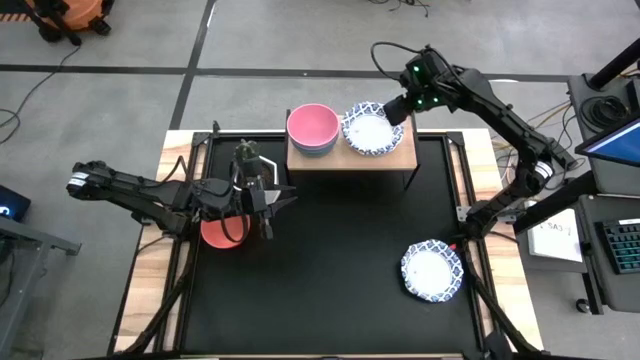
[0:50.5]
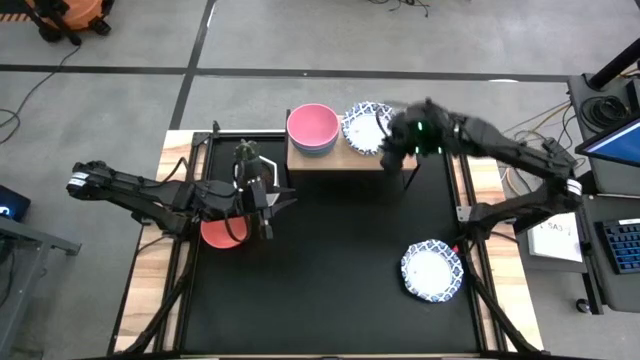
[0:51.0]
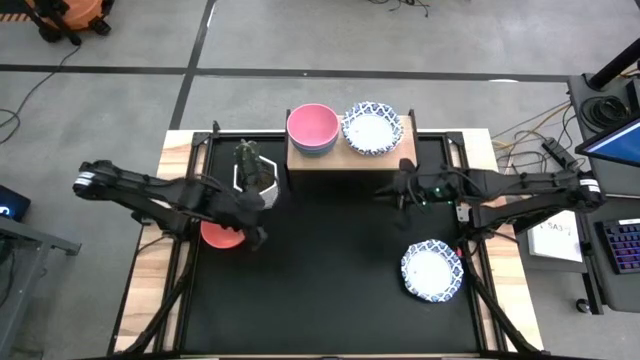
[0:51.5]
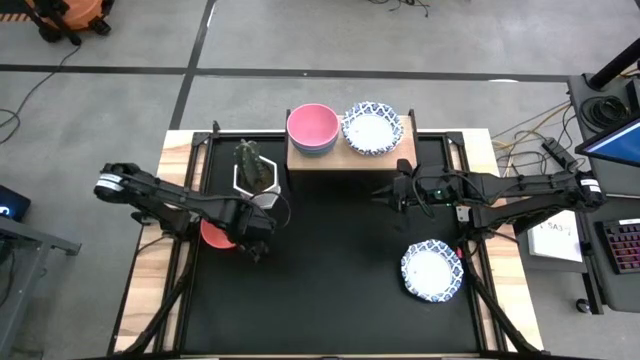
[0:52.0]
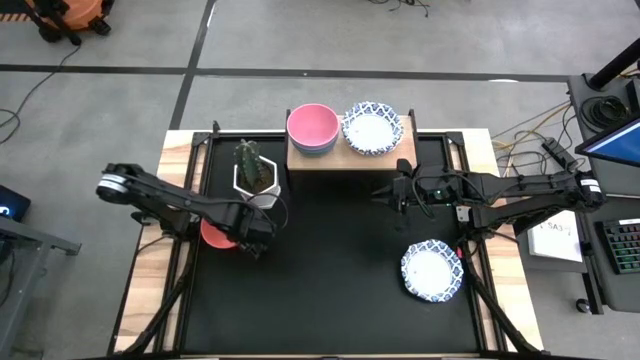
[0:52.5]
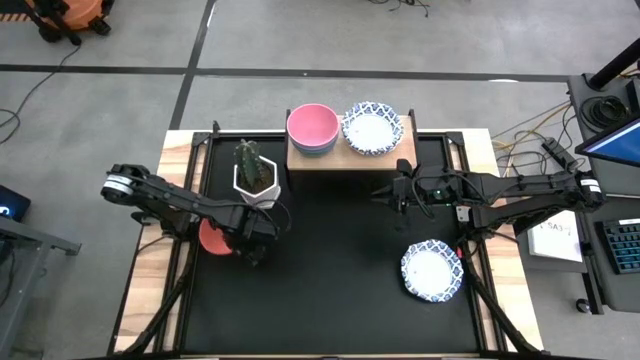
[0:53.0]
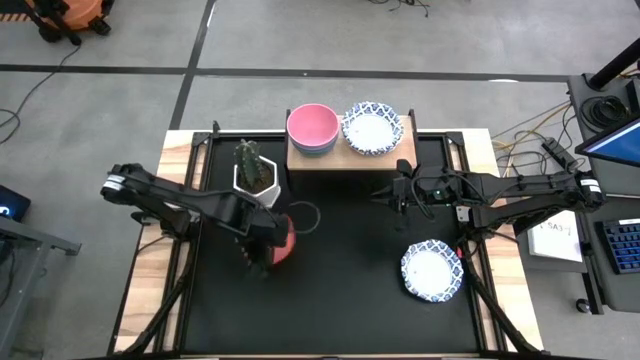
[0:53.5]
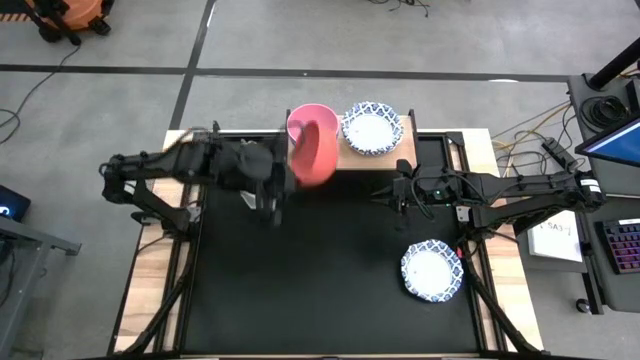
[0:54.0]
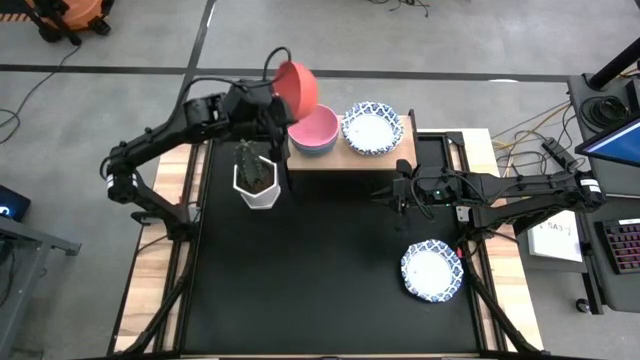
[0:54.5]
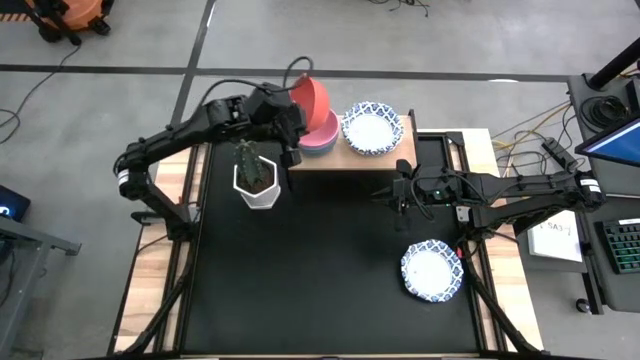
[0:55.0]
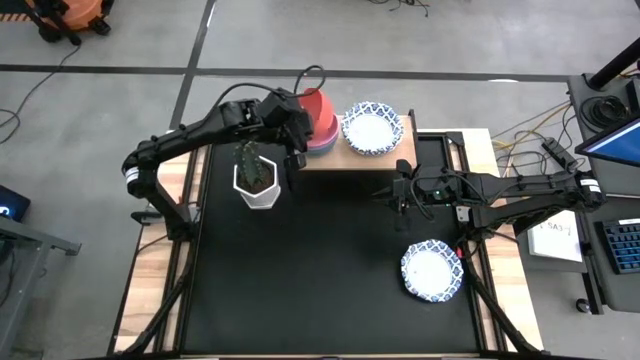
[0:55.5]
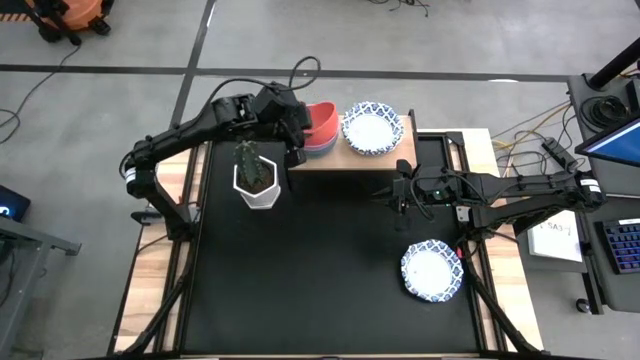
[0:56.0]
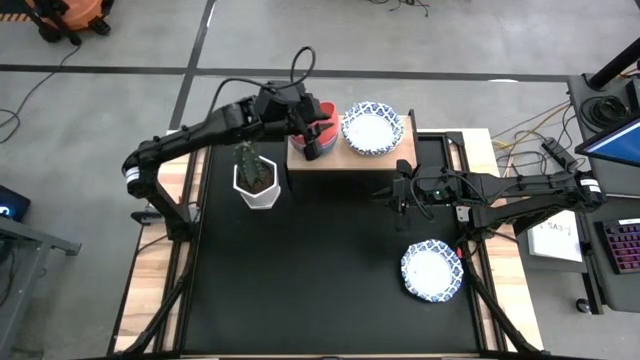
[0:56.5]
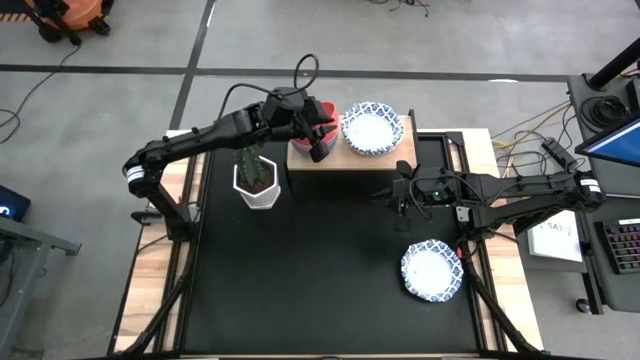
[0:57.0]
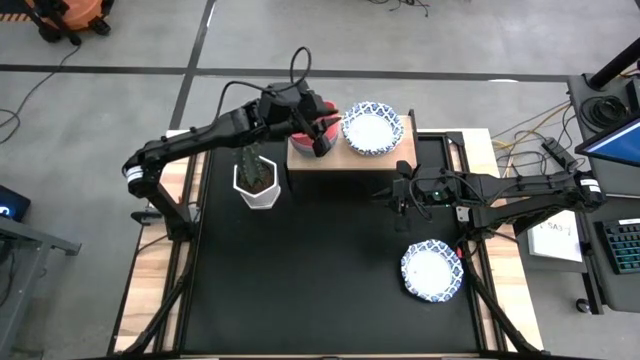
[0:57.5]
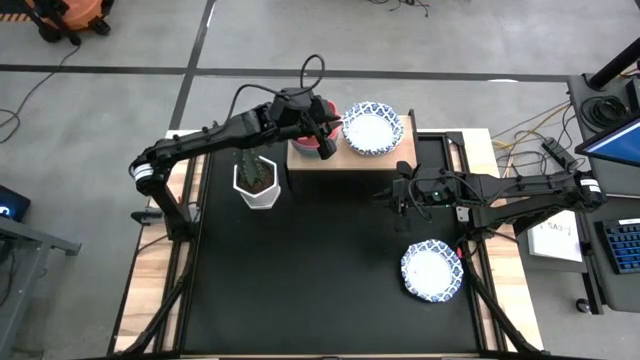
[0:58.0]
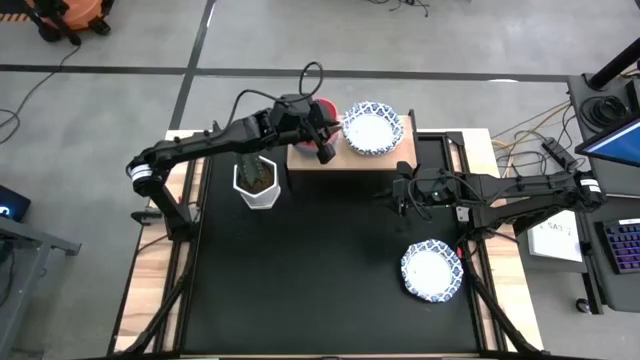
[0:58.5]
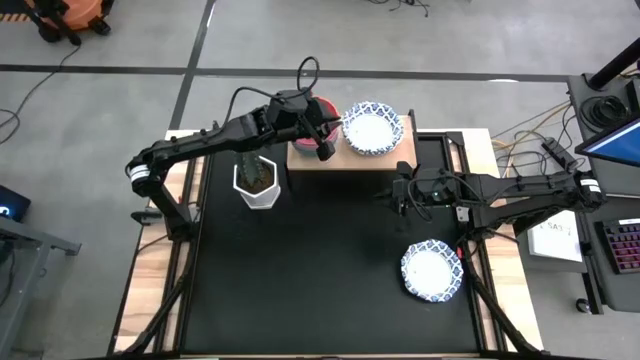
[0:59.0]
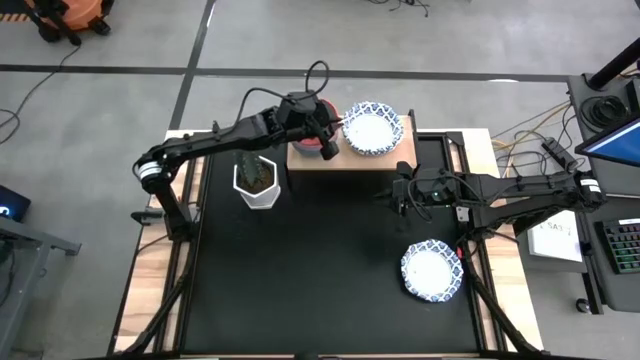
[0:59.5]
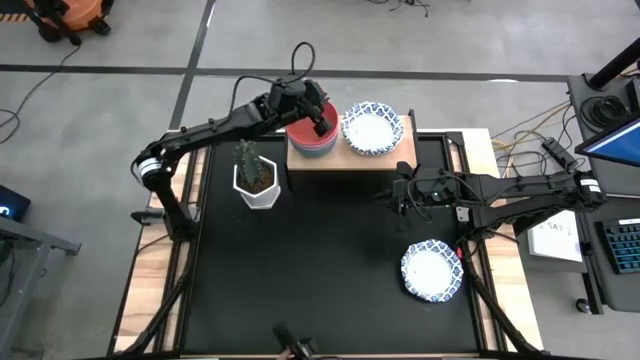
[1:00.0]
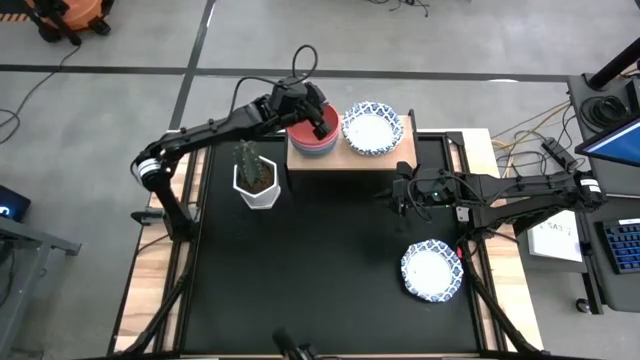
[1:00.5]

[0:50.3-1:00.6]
Task: Place and stack bowls onto a shelf
Stack the orange bowl on top of the pink bowls on the shelf

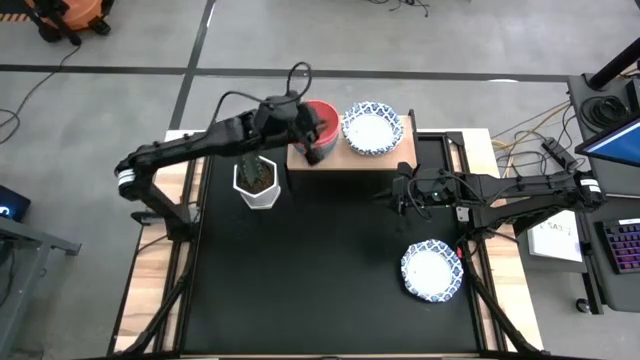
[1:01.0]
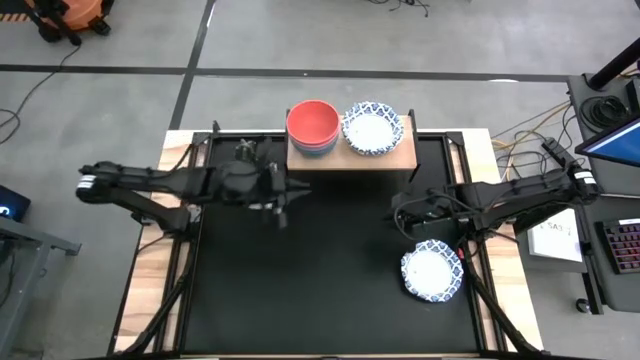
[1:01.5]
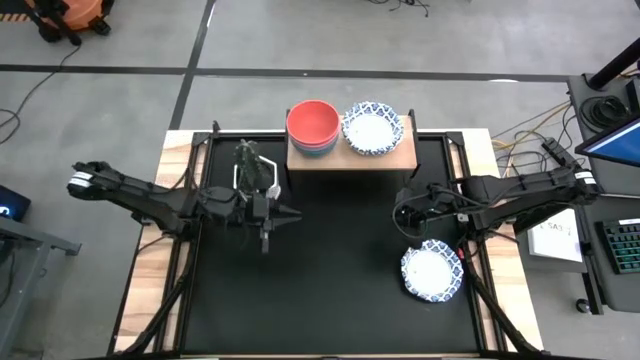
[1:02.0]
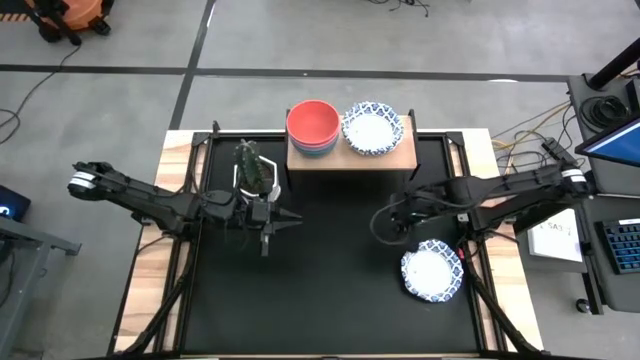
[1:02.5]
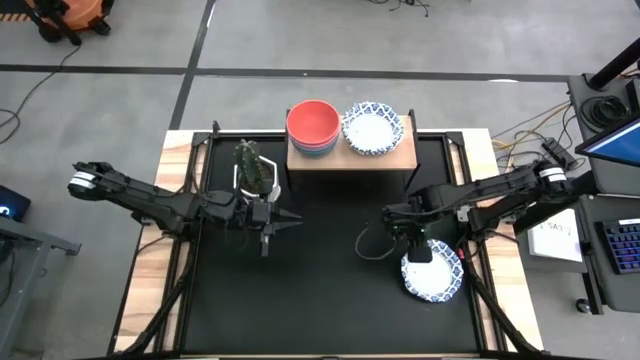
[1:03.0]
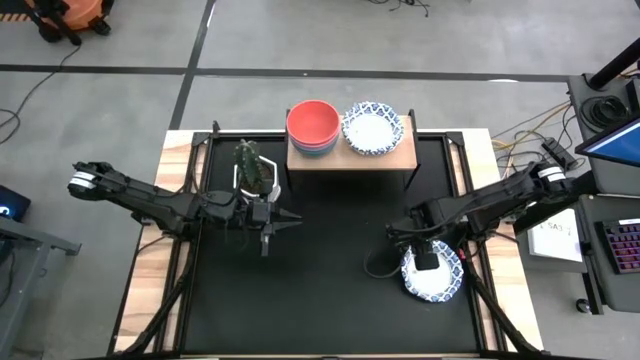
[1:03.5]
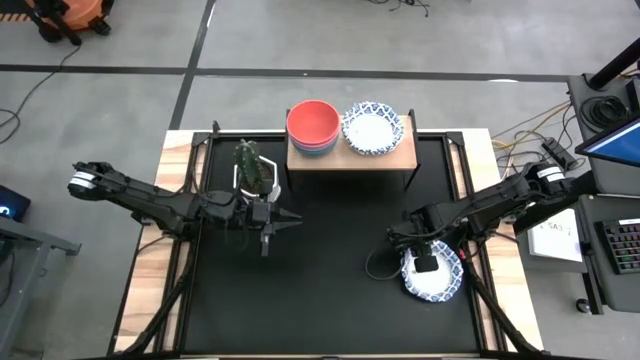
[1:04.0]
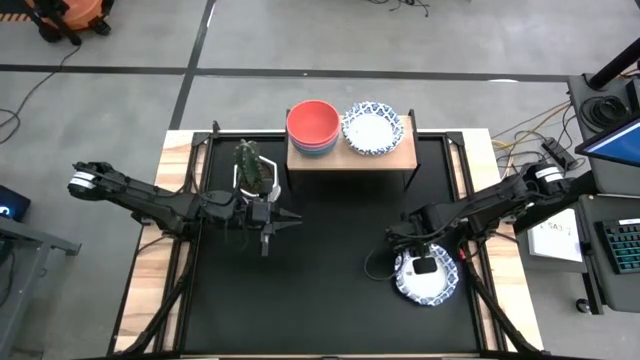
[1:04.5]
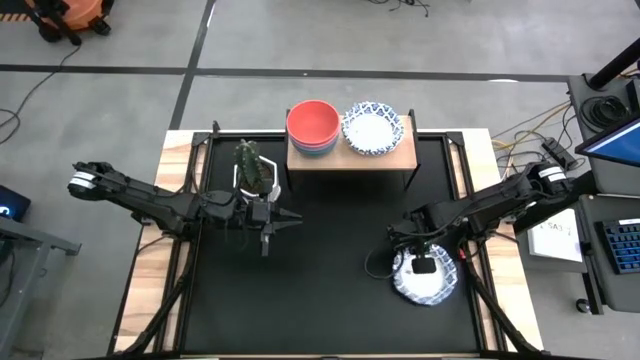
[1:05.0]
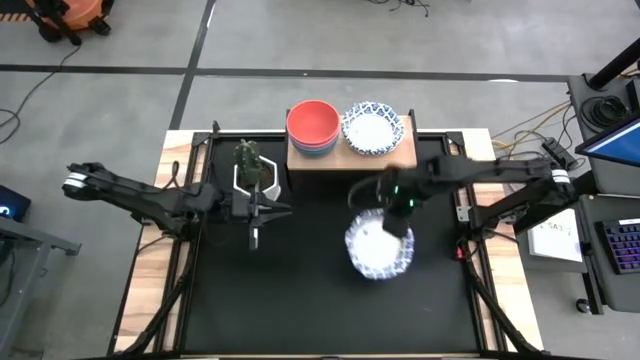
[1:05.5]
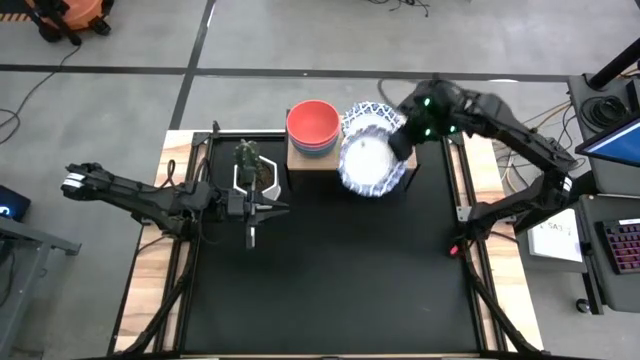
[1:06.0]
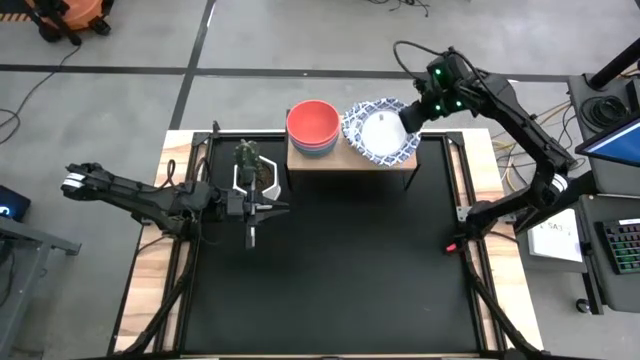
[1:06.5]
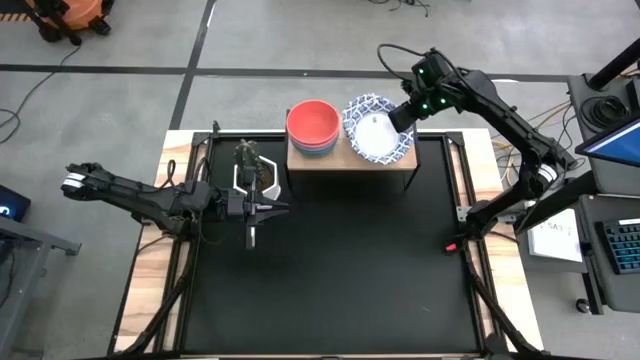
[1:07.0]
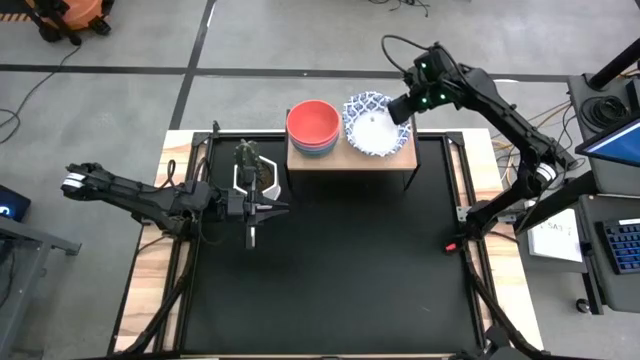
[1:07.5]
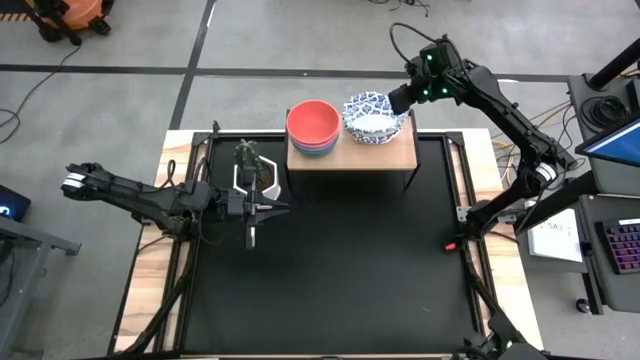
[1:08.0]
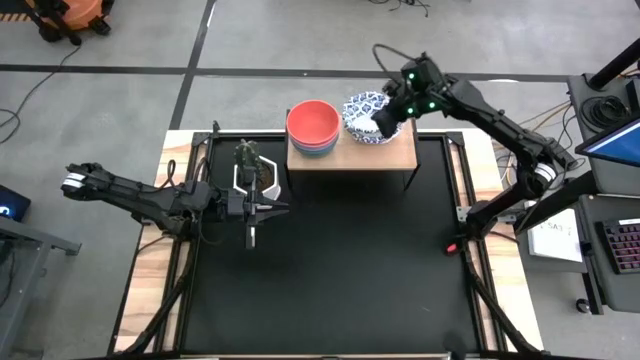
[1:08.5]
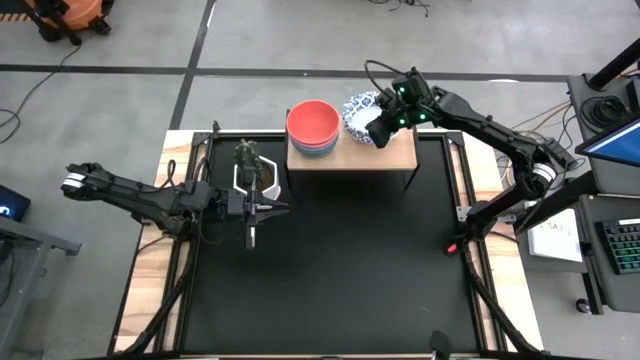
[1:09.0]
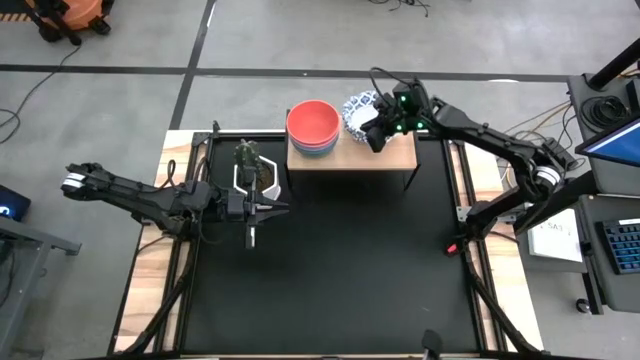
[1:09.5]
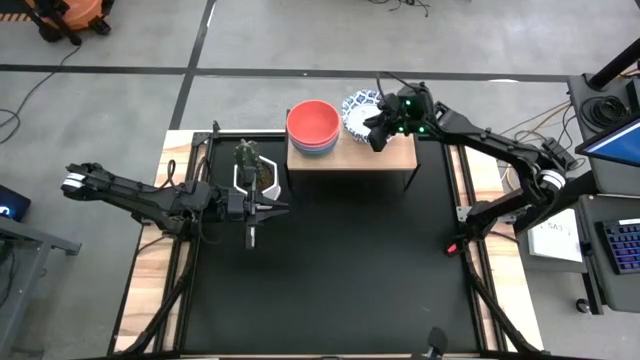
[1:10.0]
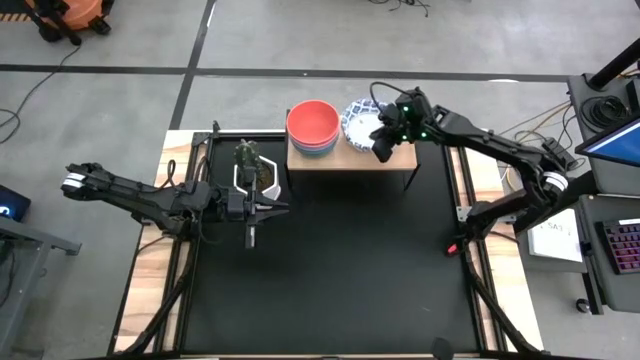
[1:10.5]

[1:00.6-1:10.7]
Stack the blue patterned bowl on top of the blue patterned bowls on the shelf

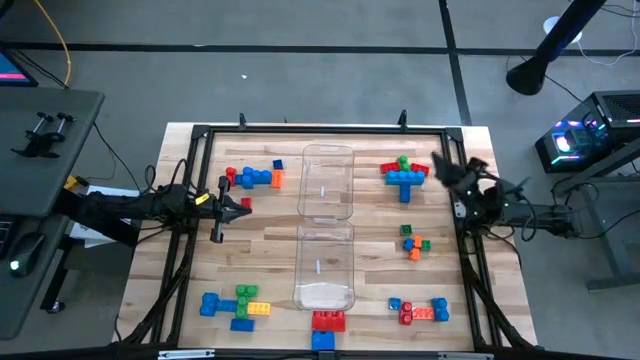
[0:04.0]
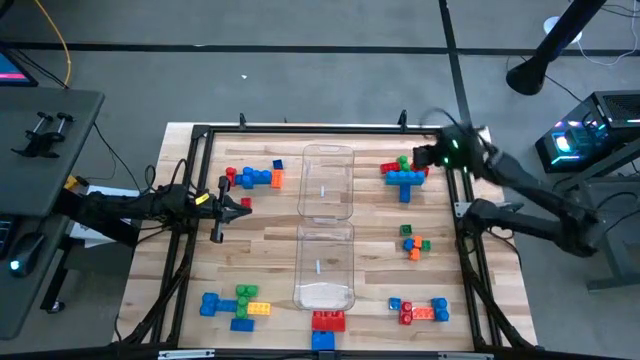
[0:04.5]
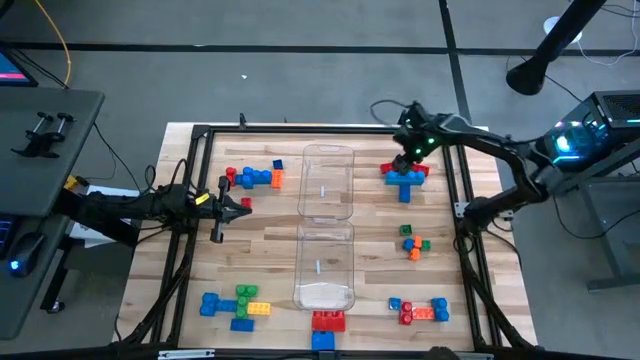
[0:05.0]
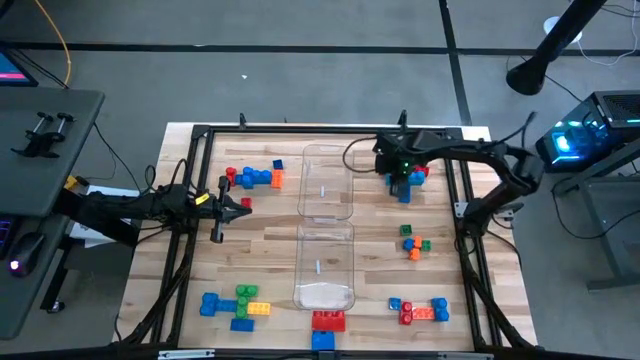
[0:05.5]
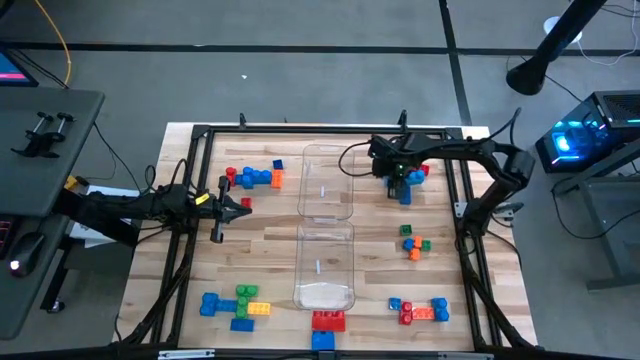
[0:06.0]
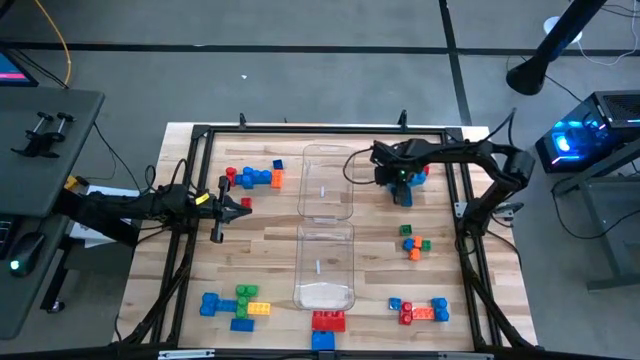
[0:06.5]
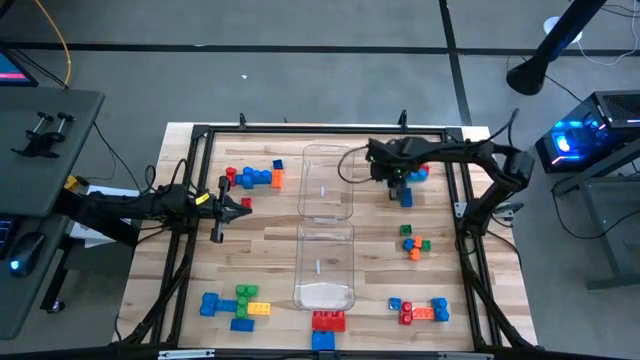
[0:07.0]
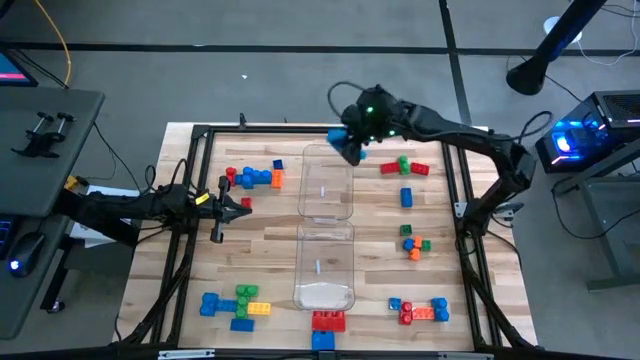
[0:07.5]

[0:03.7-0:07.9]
Task: Sort blocks by size
Put the large blue game piece in the top transparent bin
